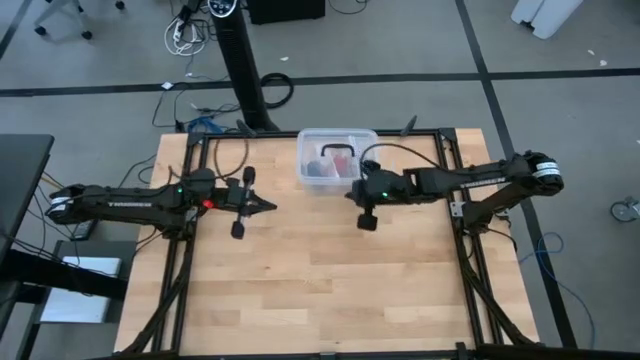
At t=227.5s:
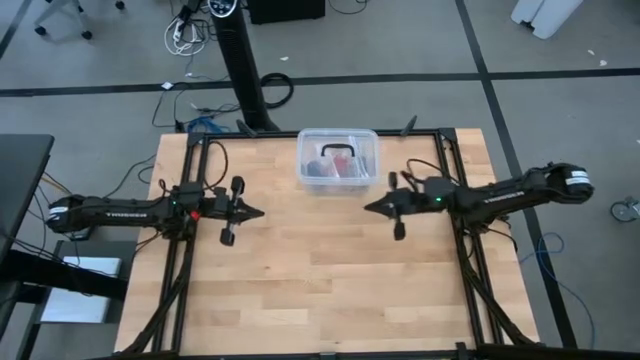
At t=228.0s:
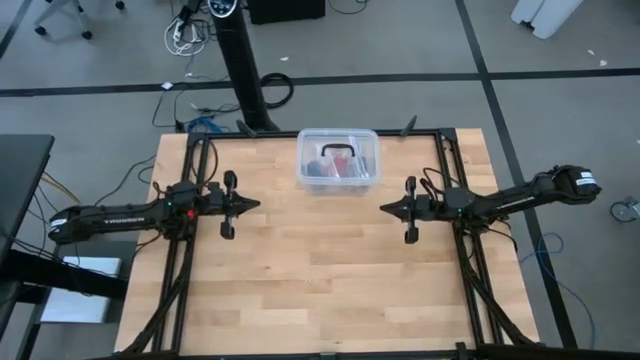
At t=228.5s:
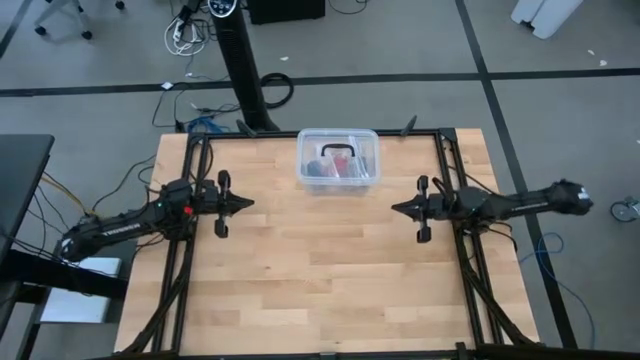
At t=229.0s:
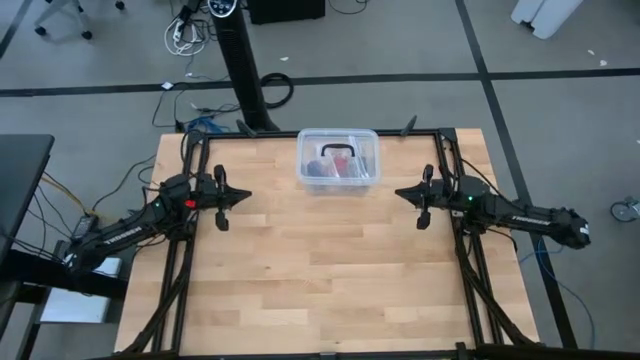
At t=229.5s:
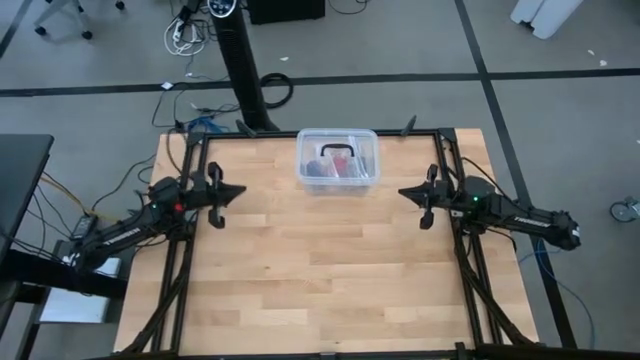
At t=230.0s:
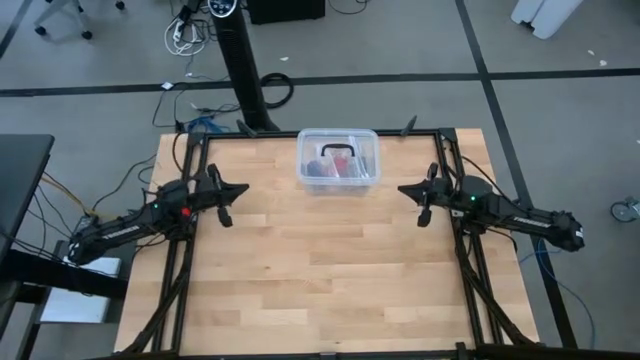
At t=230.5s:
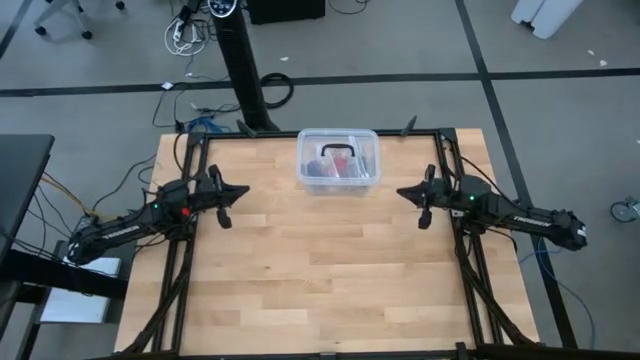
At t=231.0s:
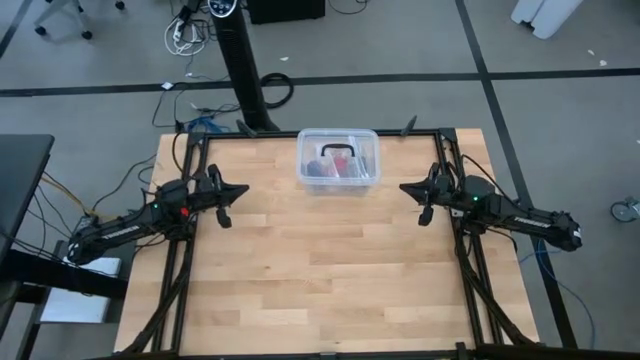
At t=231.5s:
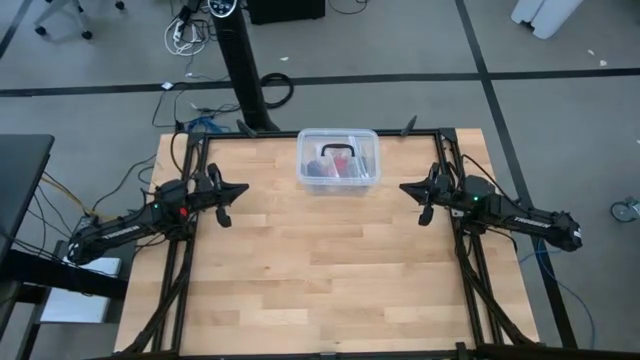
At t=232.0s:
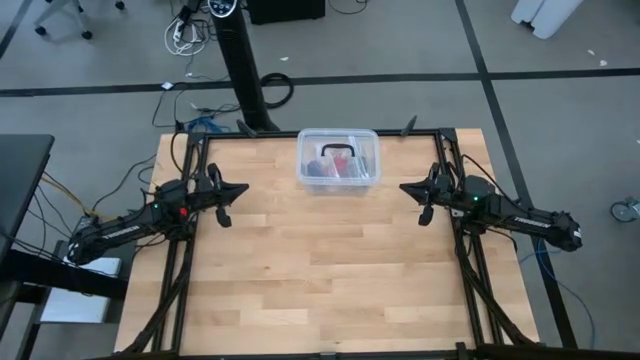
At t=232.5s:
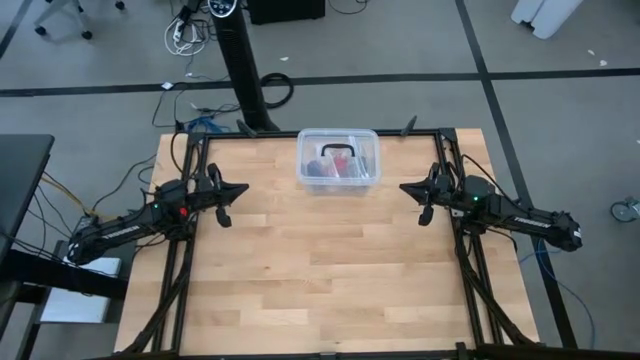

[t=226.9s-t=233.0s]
Task: Roll bandage
Return to Home Position

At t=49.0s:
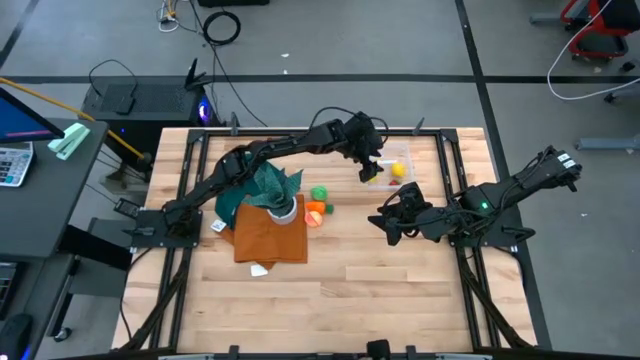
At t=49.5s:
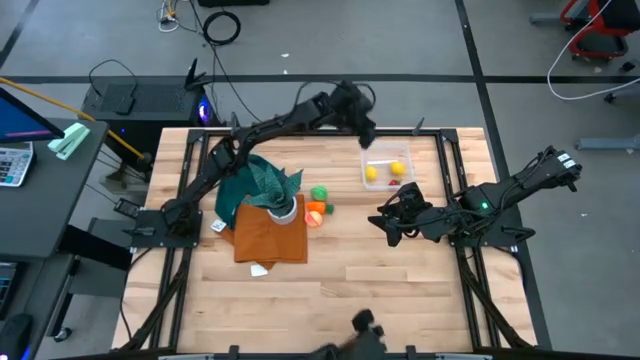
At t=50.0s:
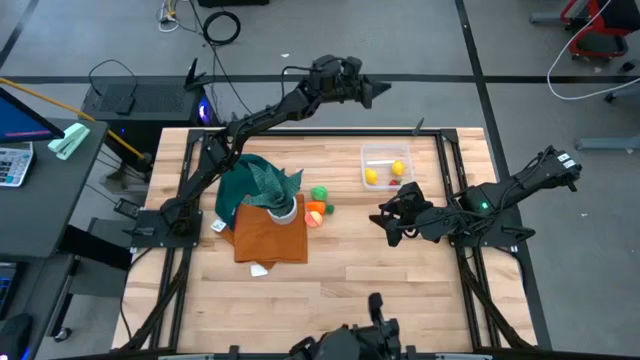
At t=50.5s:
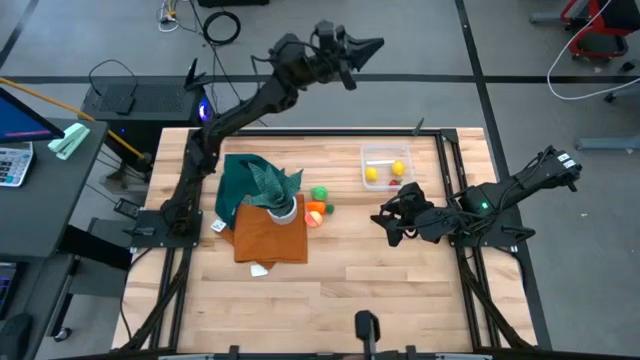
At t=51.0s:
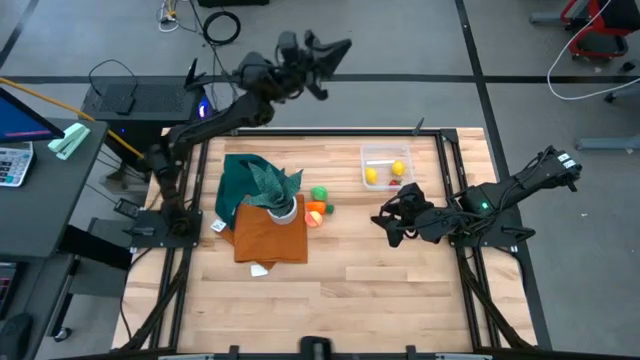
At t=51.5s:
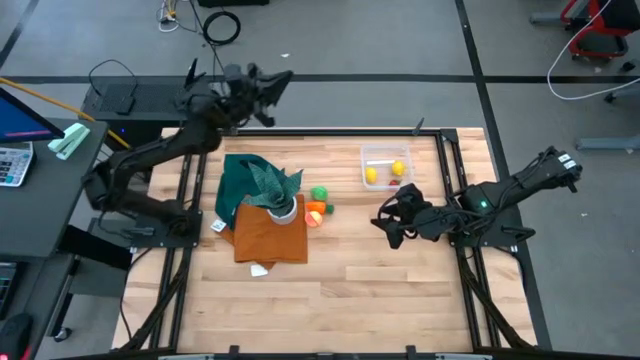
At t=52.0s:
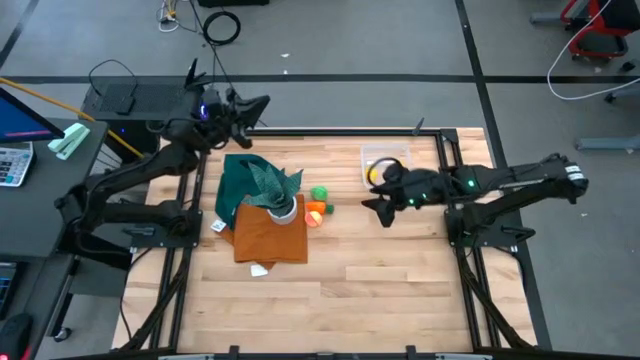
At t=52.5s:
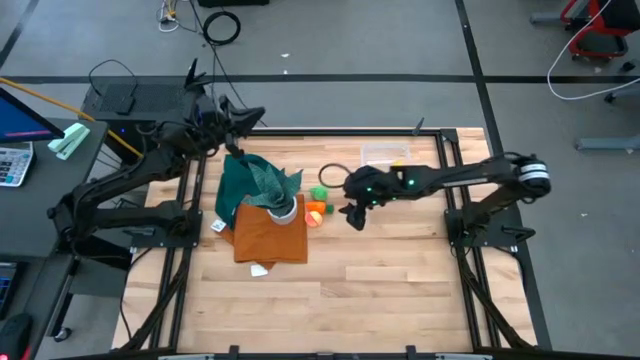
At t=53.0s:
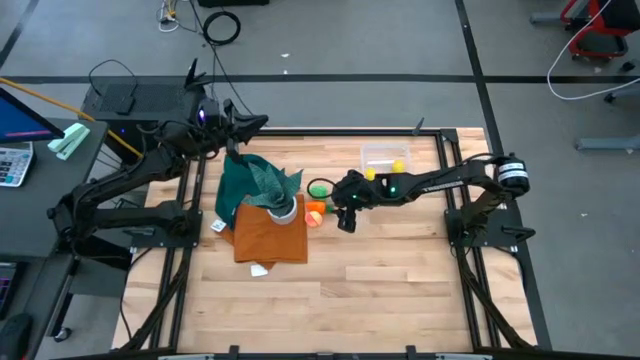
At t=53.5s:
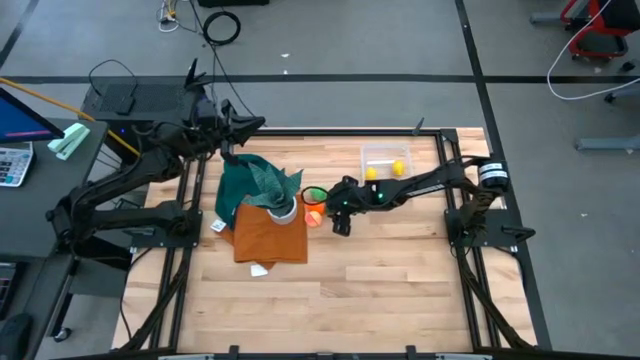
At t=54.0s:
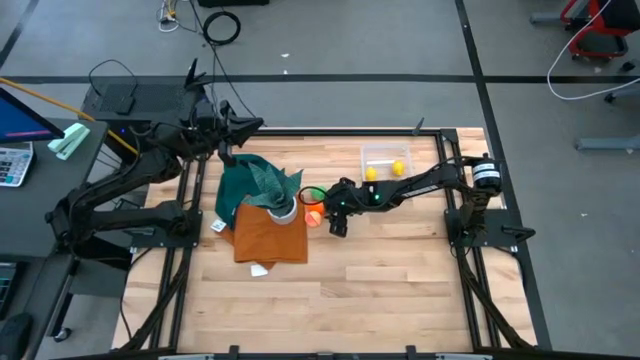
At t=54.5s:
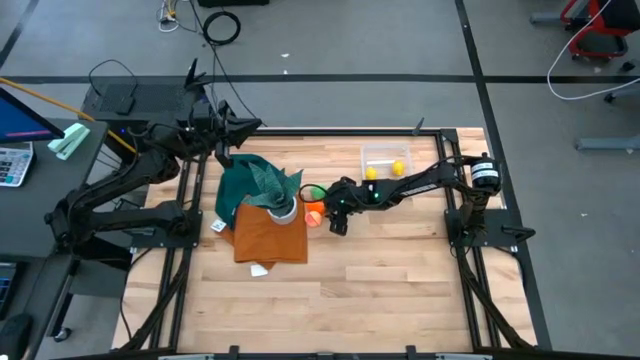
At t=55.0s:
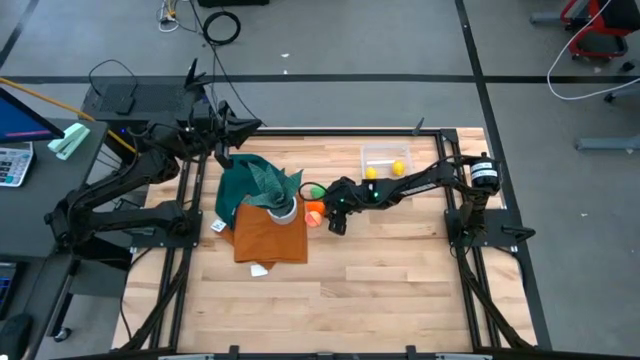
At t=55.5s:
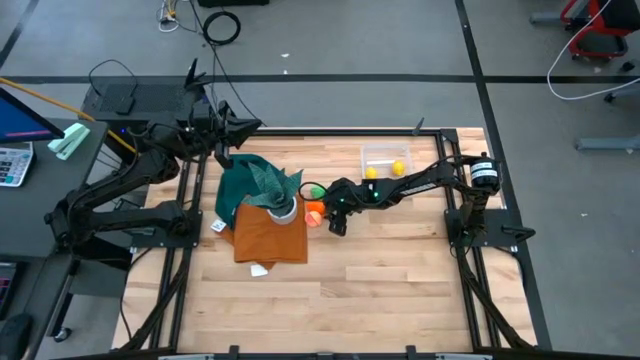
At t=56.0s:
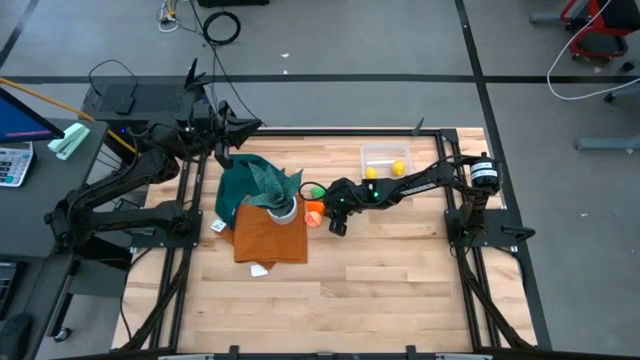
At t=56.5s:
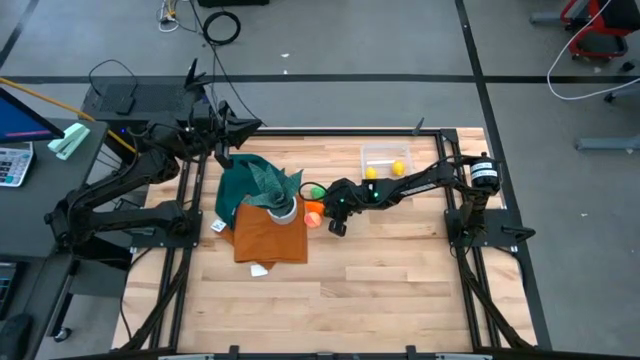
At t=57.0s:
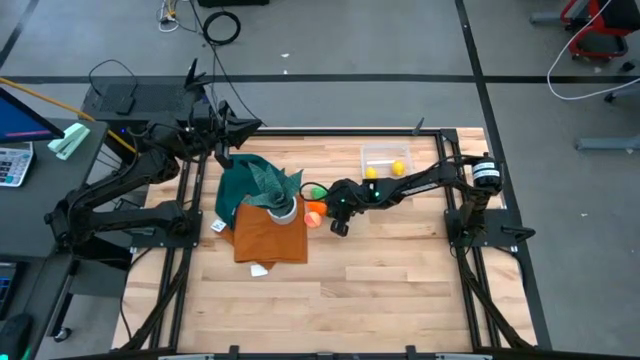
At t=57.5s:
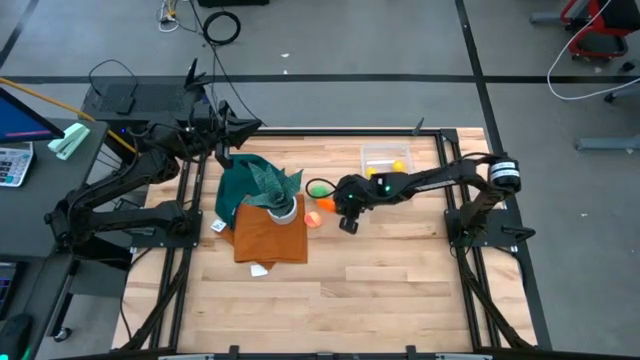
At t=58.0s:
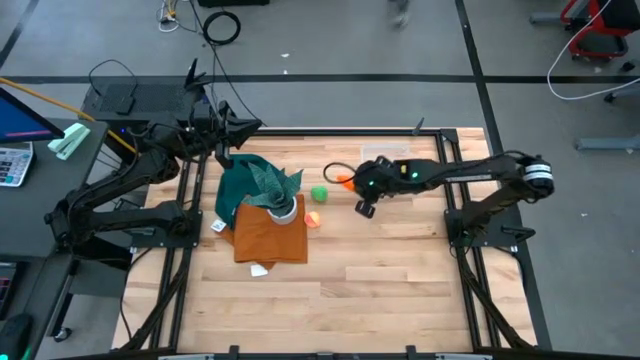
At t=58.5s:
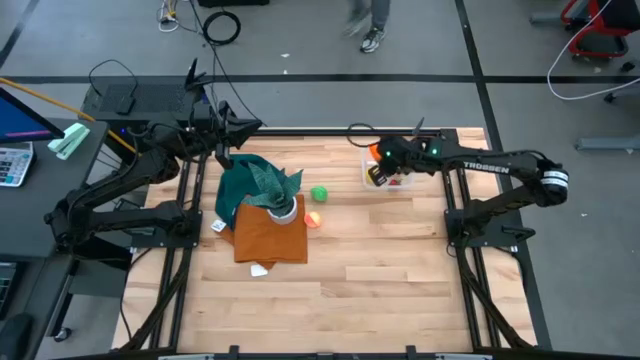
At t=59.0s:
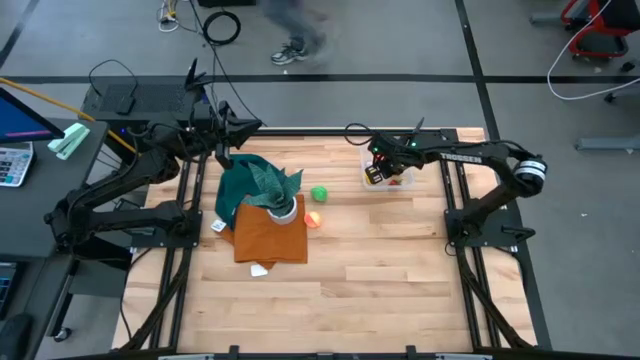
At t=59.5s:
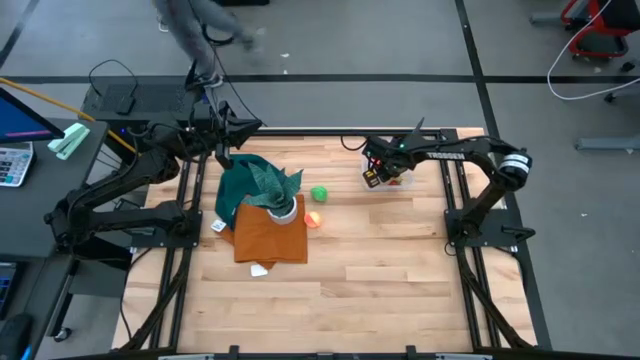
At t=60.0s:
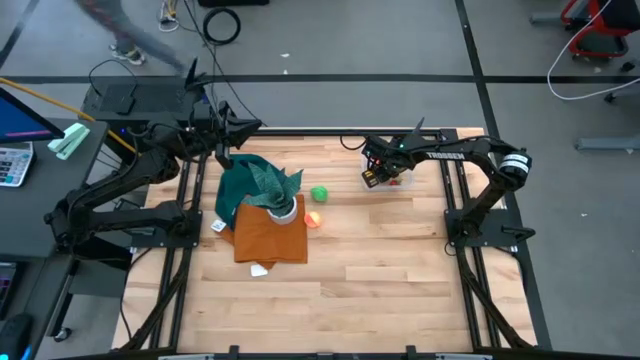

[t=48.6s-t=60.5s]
Task: Pick and placing Produce into tupperware
Put the carrot into the transparent bin
